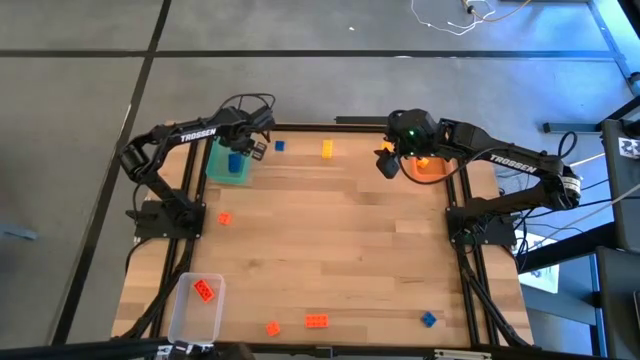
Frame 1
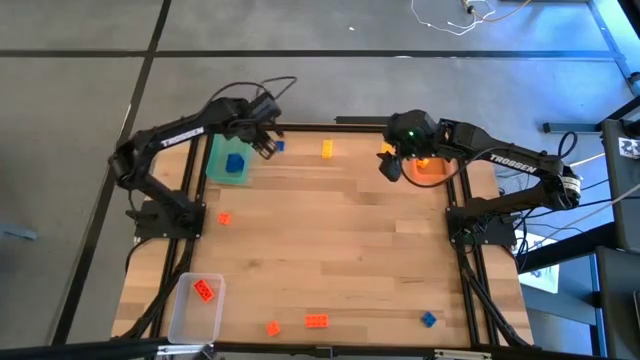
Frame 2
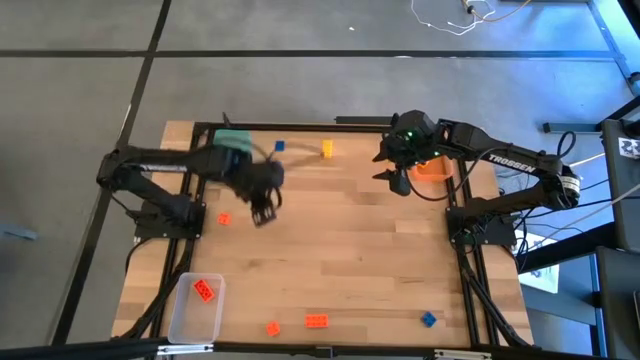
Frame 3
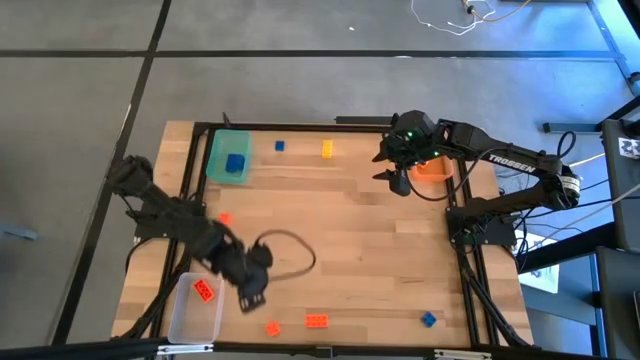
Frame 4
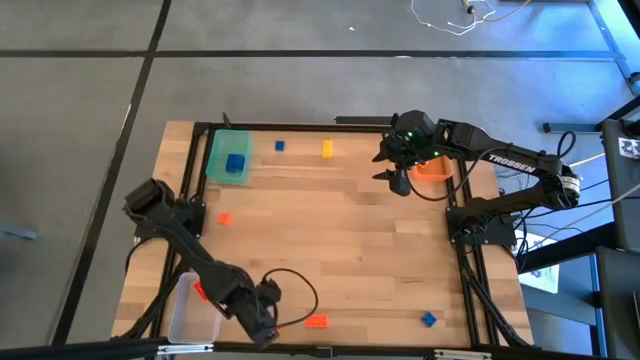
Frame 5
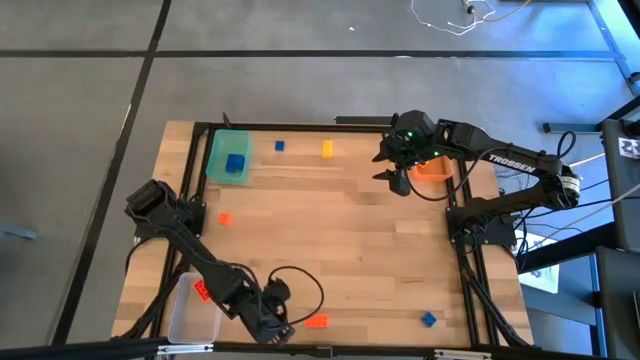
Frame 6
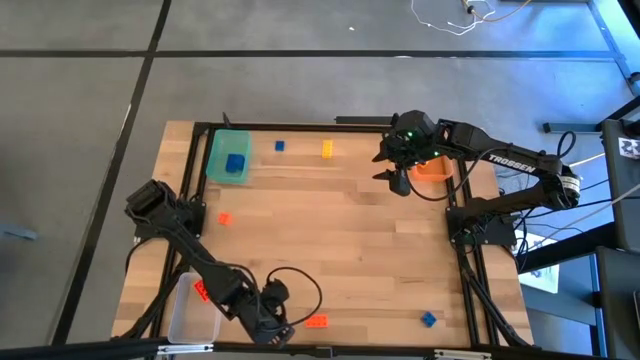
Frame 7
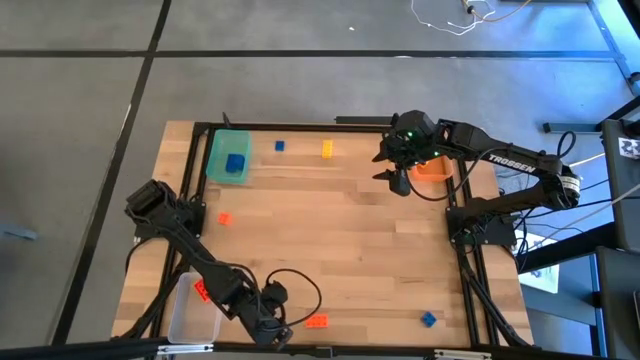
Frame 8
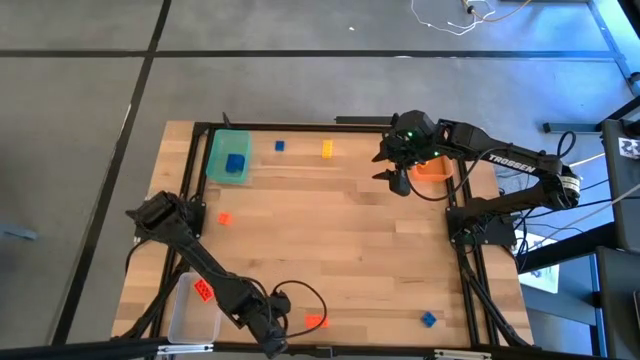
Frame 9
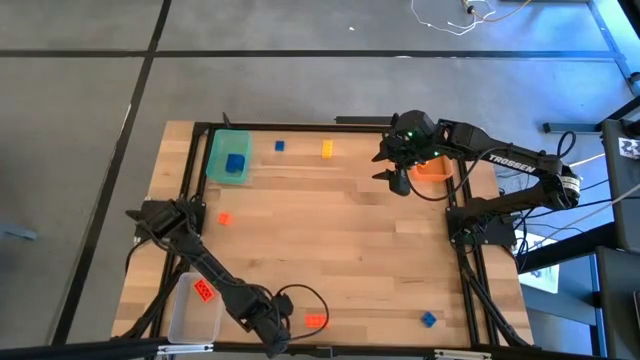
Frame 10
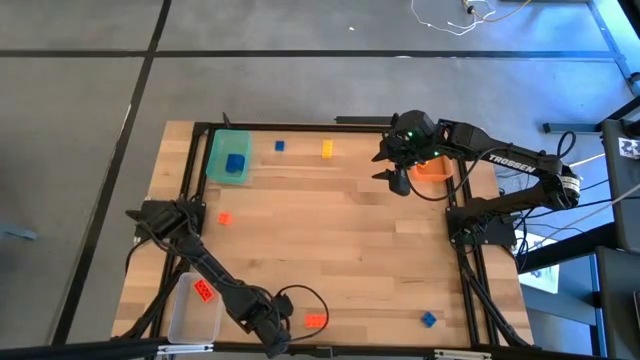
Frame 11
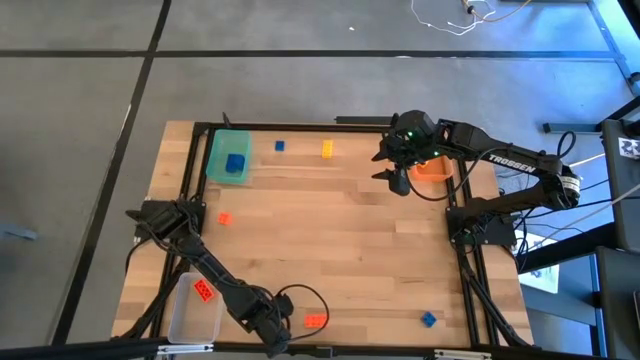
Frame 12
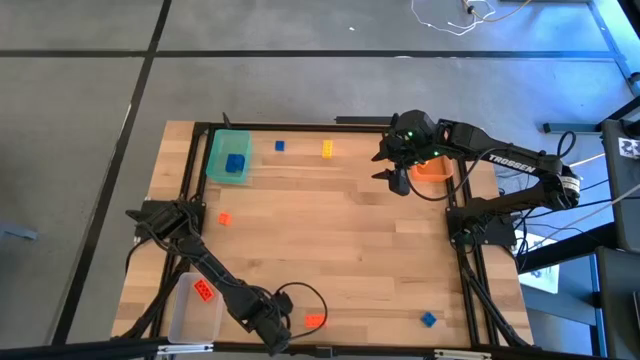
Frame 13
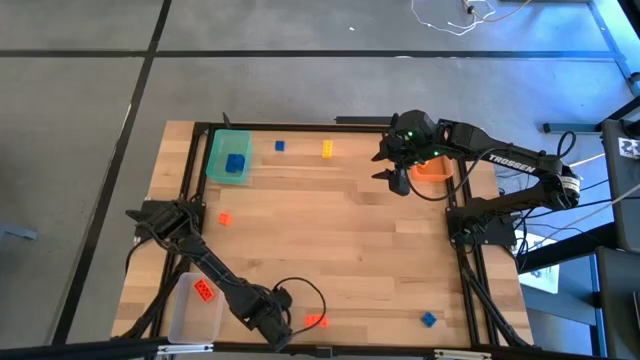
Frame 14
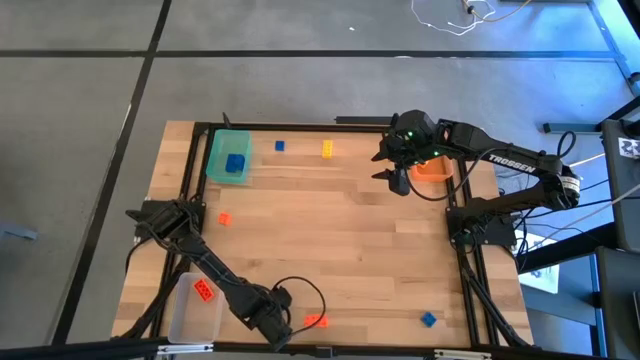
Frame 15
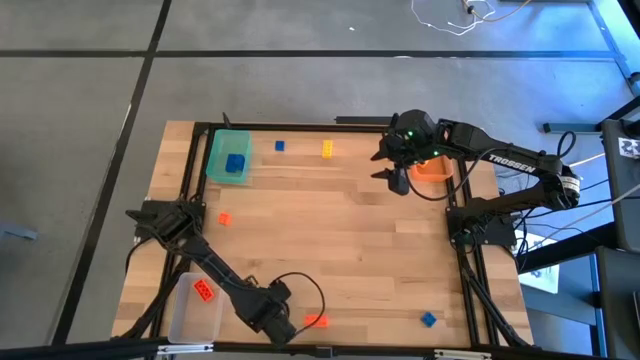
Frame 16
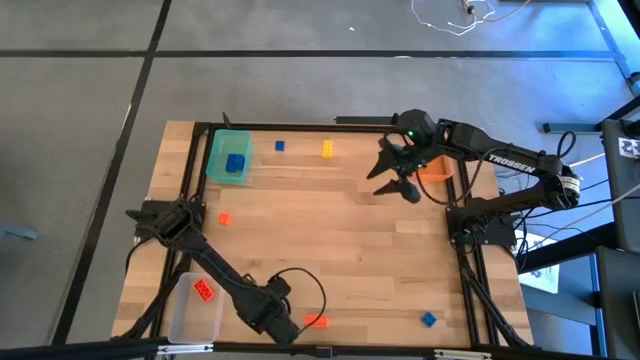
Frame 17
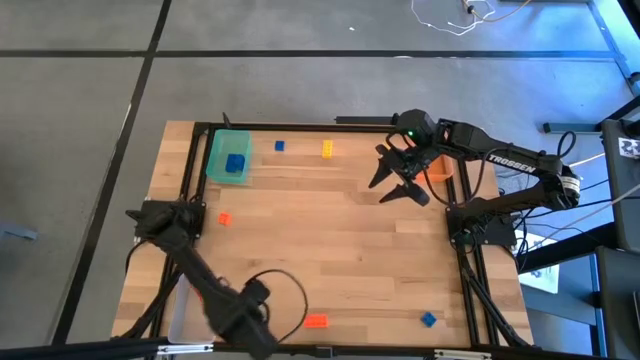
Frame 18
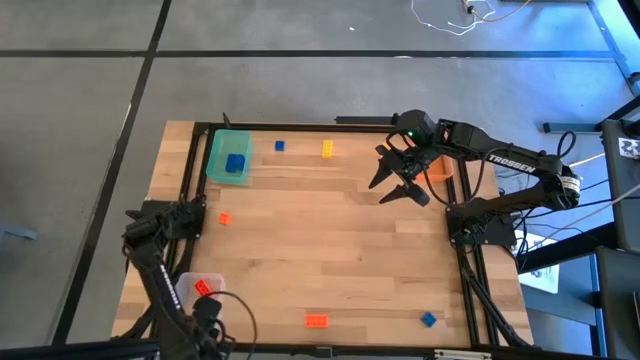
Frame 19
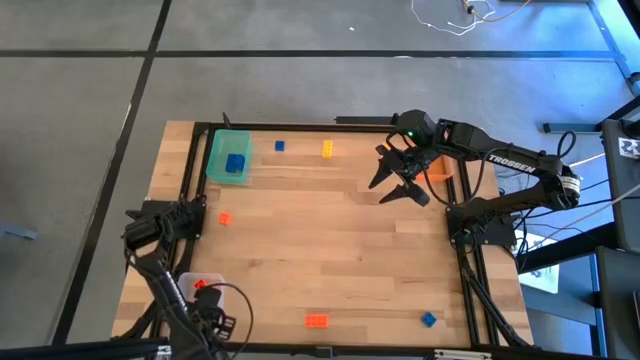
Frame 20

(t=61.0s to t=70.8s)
Task: Sort & place blocks by color
Put the orange game piece into the transparent bin

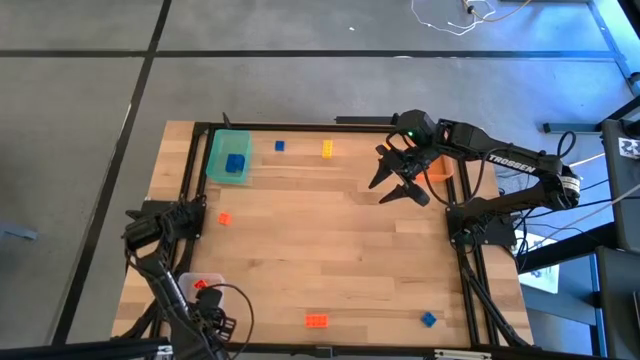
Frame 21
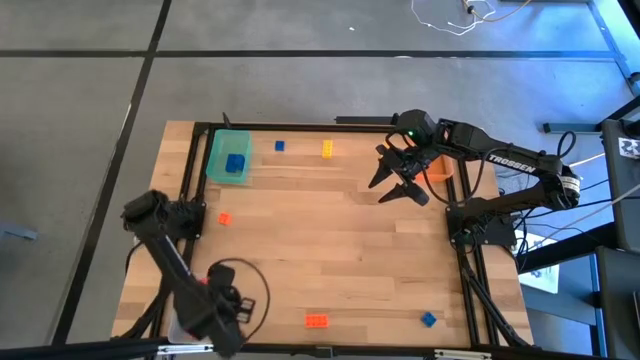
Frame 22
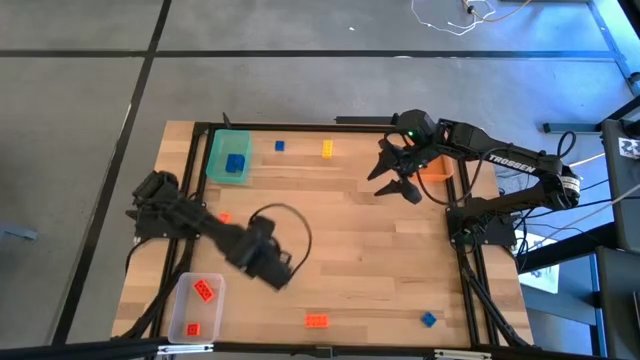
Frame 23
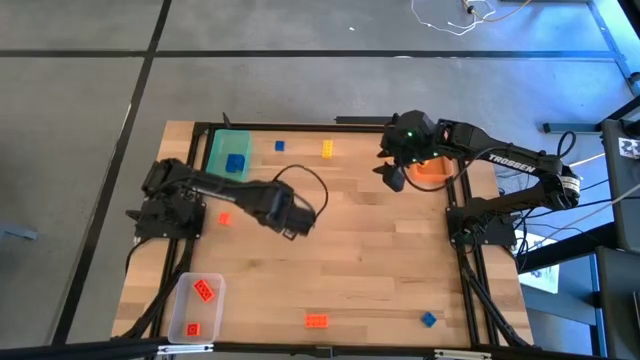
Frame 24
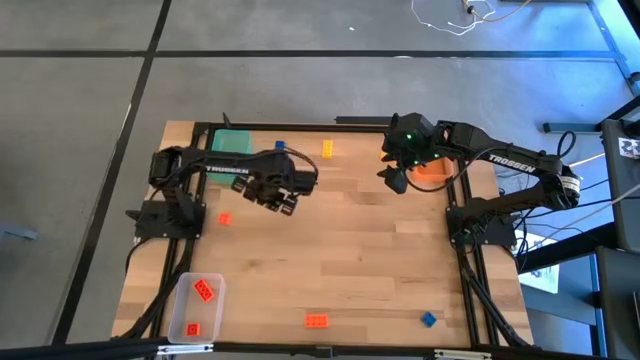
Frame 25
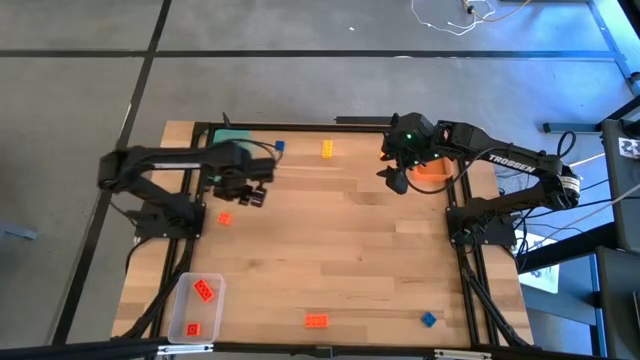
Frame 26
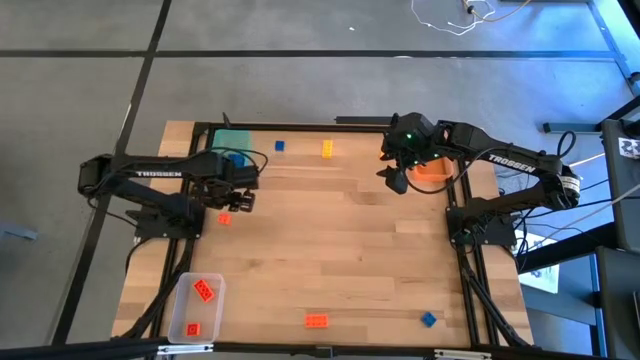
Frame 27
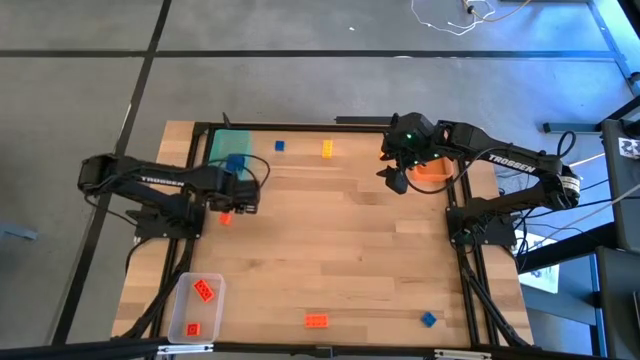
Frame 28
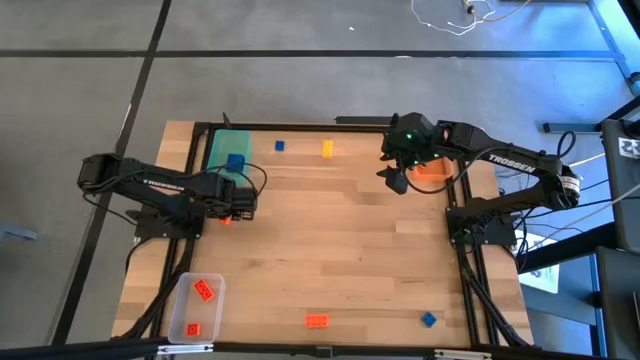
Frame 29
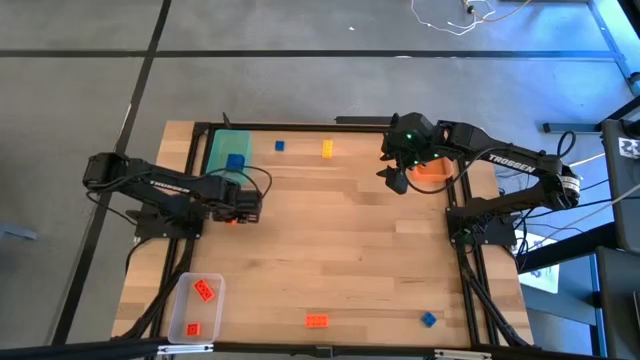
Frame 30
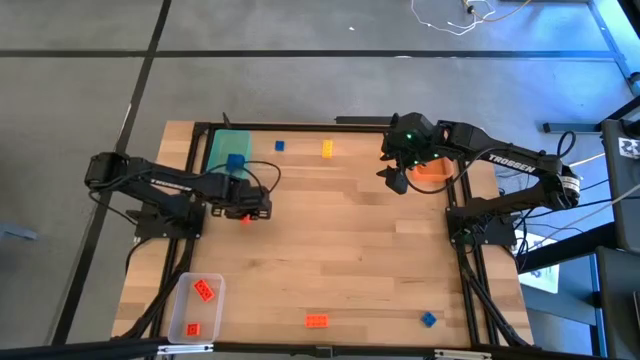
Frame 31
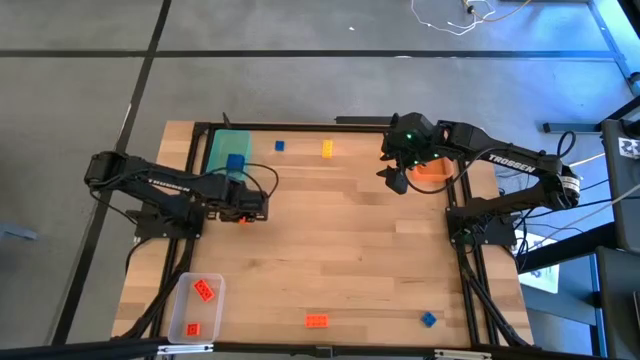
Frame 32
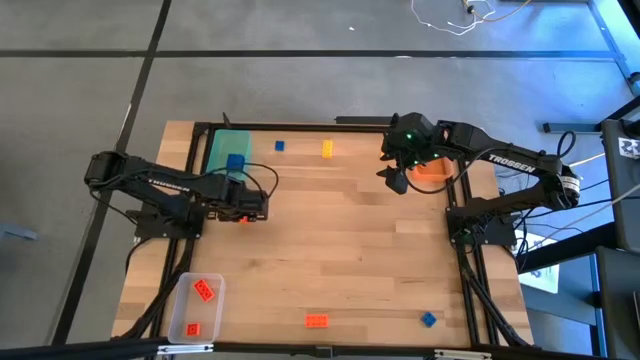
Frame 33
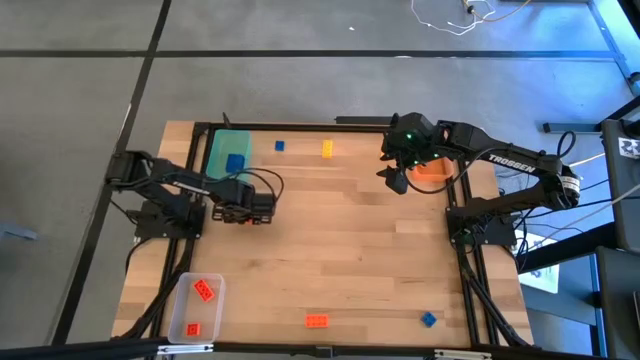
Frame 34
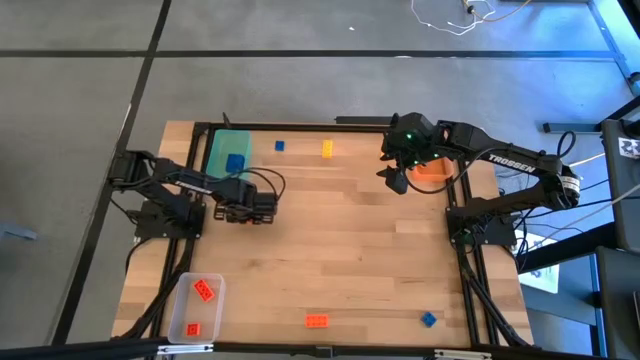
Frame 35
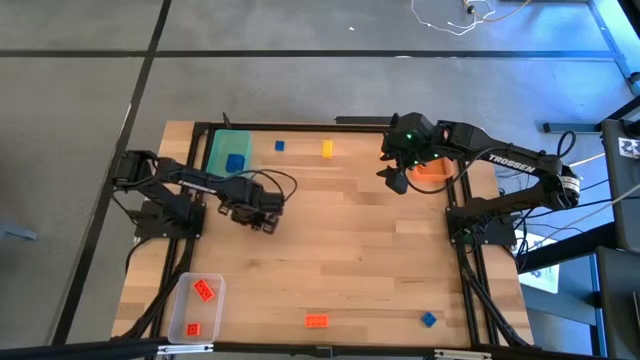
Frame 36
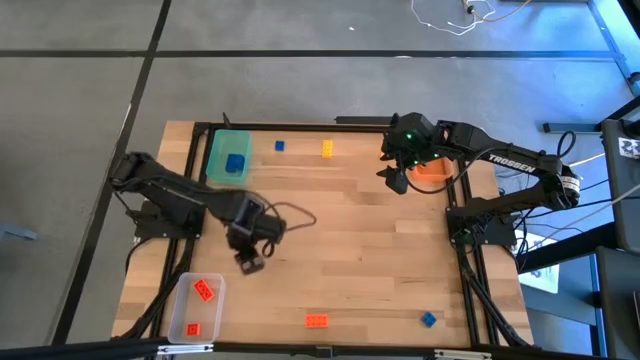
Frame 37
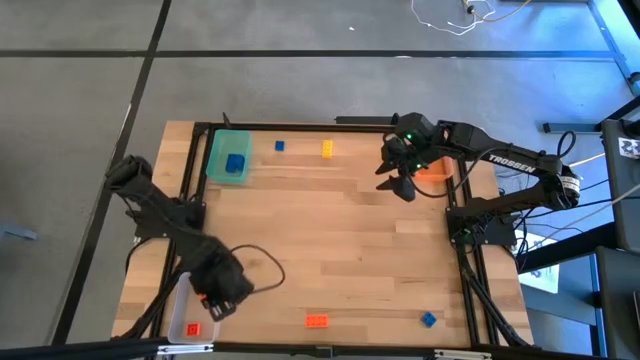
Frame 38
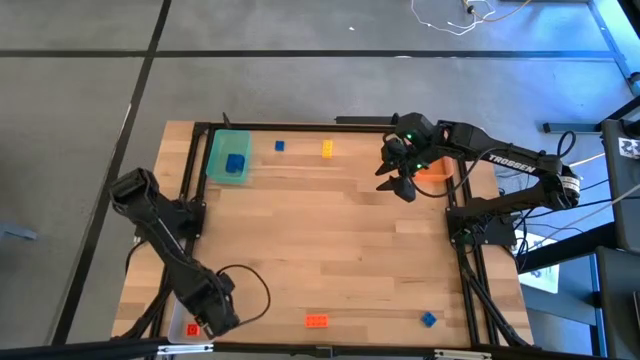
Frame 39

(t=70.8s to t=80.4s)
Put the orange game piece into the transparent bin

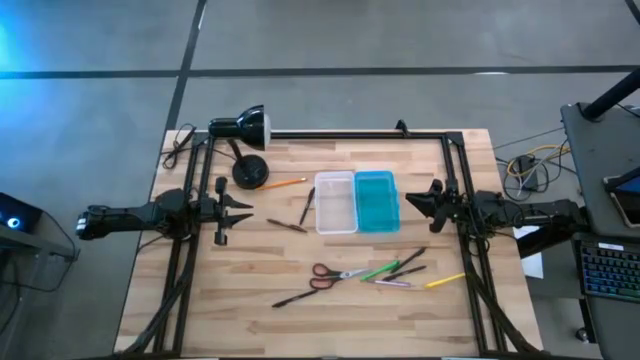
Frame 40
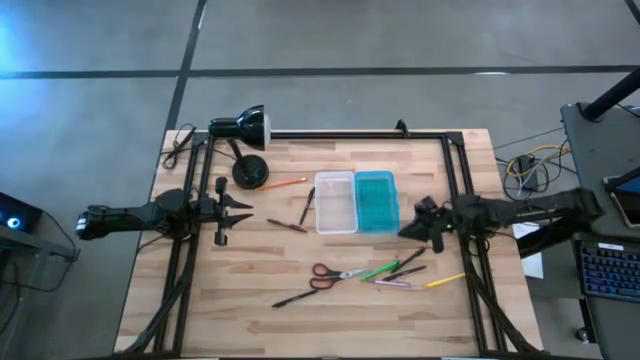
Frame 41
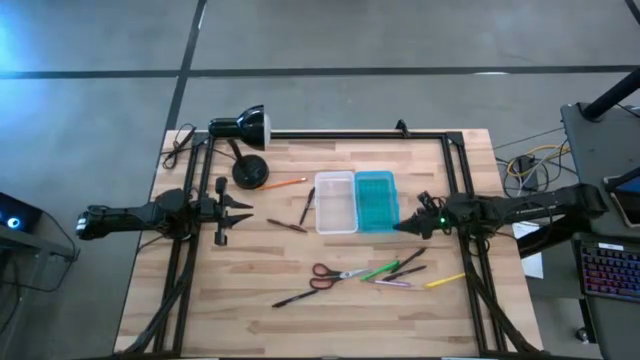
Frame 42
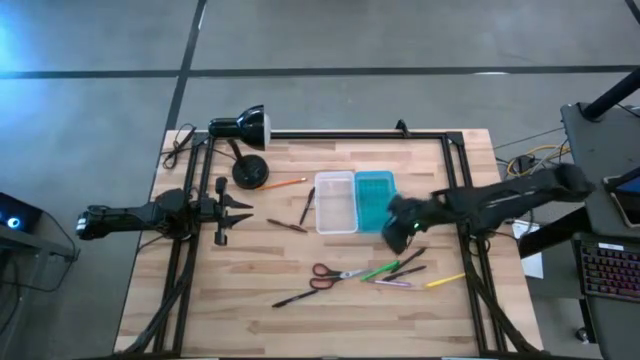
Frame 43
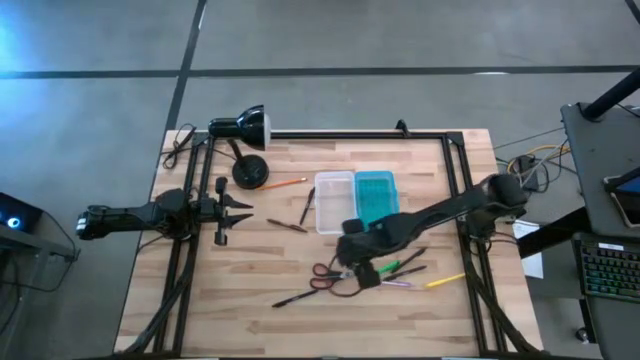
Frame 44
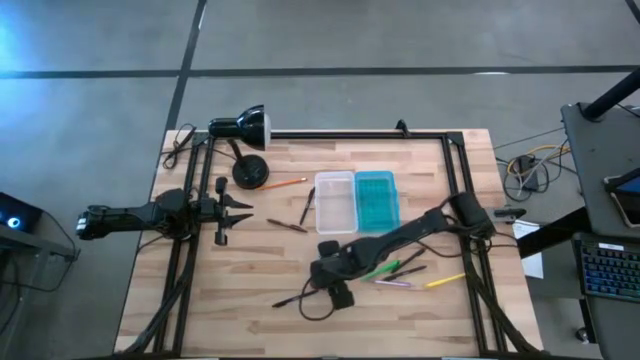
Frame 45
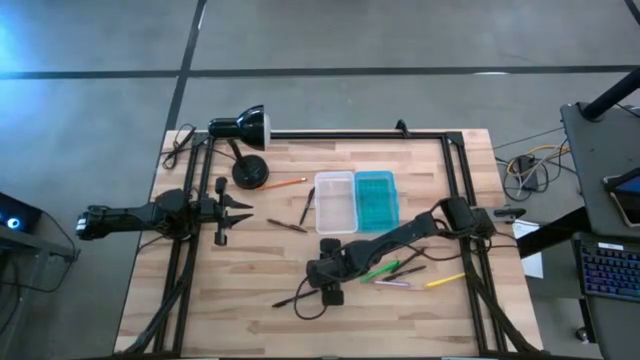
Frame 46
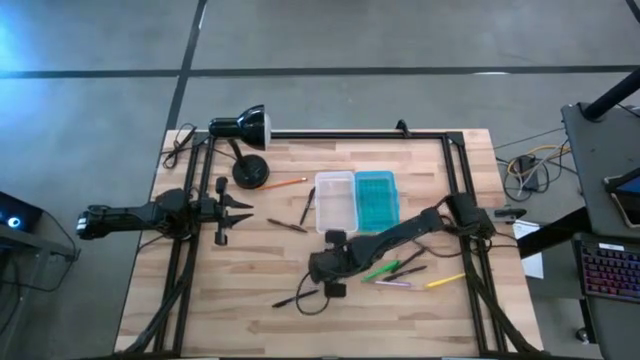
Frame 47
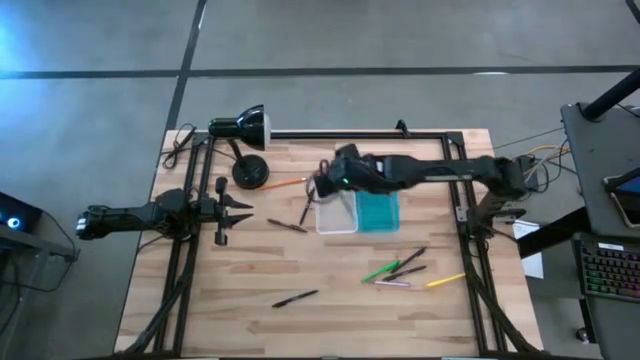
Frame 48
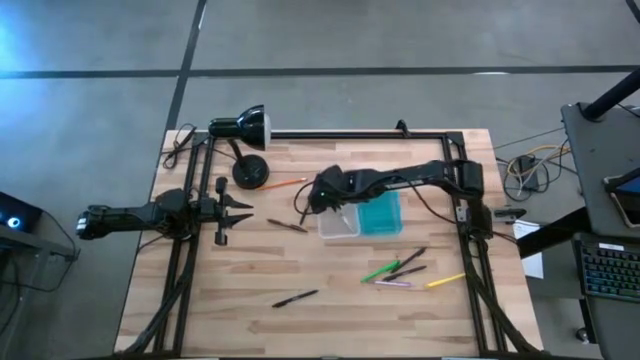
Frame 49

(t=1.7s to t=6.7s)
Task: Pick & place school supplies into a supply box
Put the black scissor into the blue supply box
